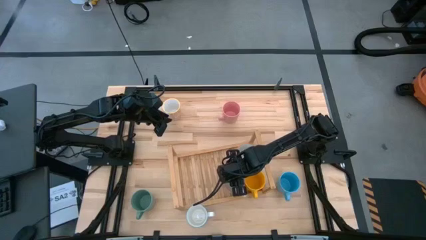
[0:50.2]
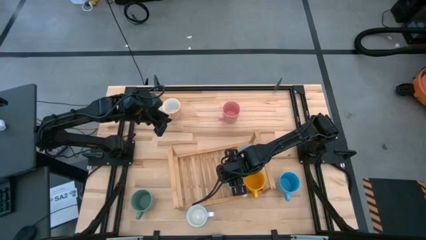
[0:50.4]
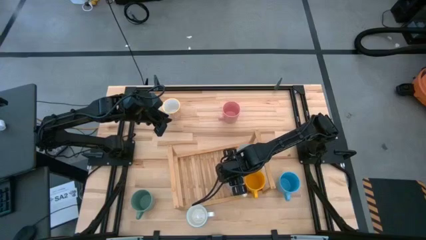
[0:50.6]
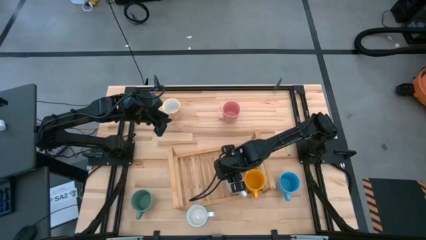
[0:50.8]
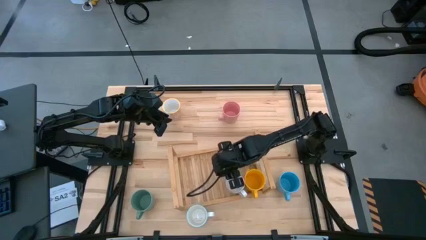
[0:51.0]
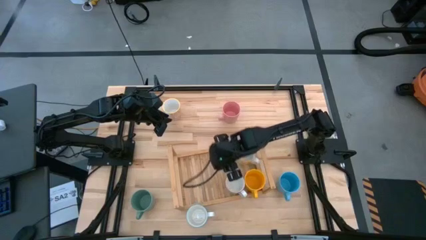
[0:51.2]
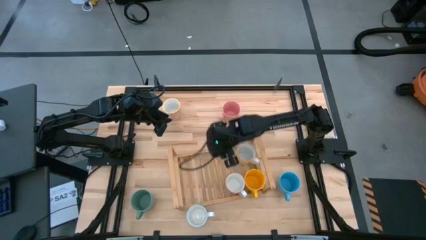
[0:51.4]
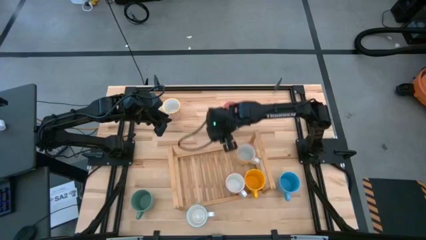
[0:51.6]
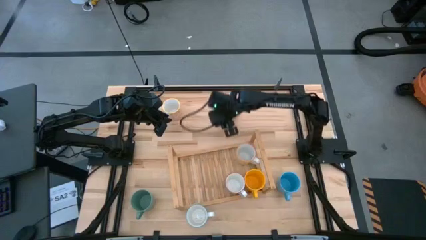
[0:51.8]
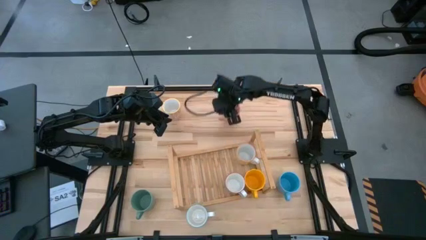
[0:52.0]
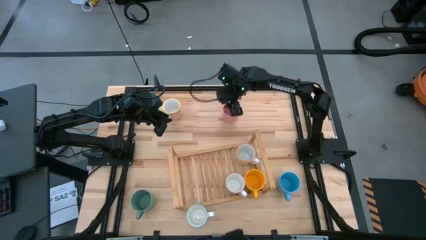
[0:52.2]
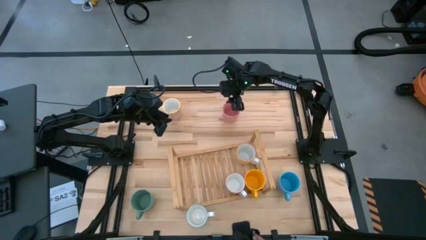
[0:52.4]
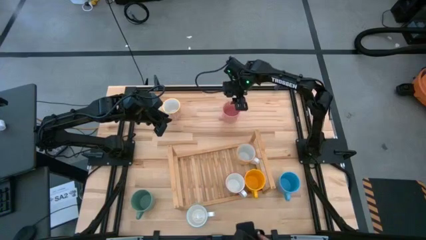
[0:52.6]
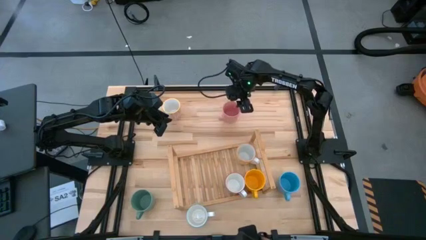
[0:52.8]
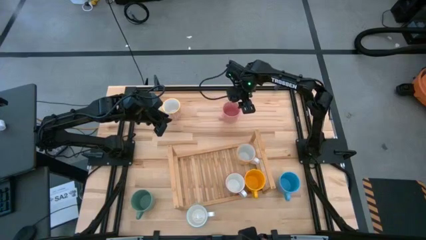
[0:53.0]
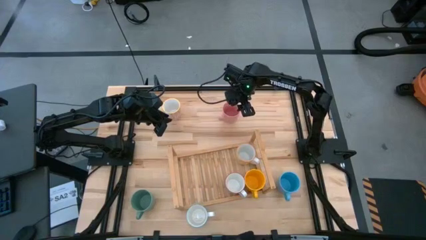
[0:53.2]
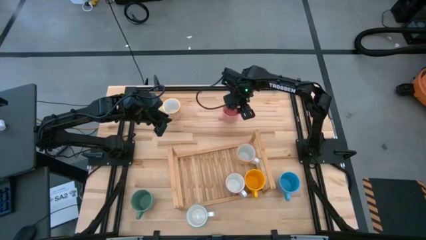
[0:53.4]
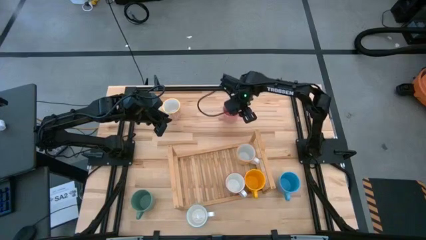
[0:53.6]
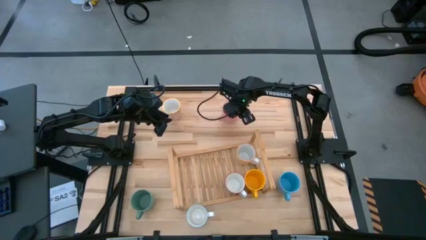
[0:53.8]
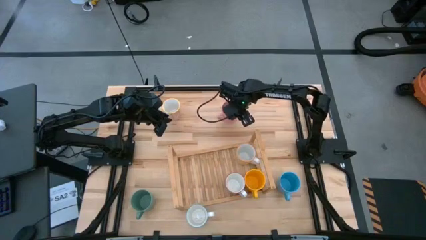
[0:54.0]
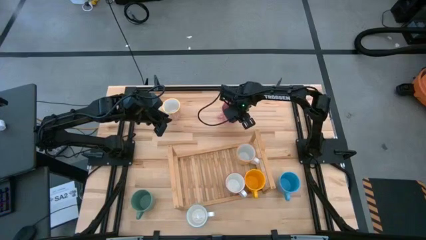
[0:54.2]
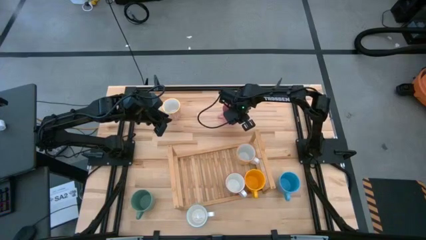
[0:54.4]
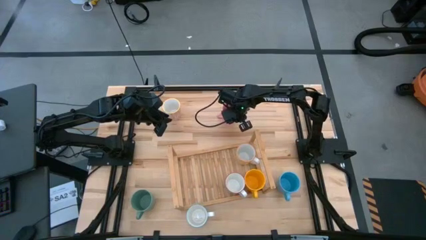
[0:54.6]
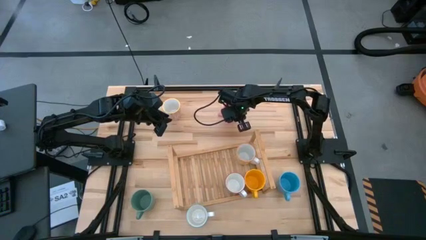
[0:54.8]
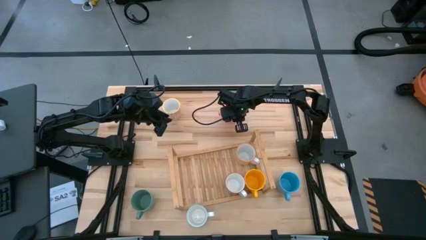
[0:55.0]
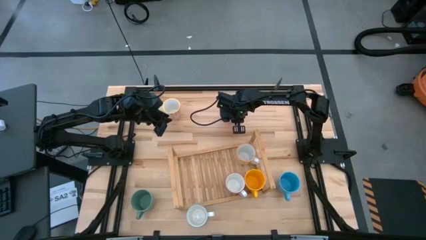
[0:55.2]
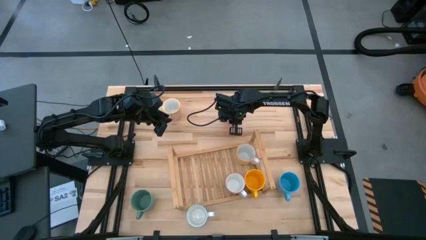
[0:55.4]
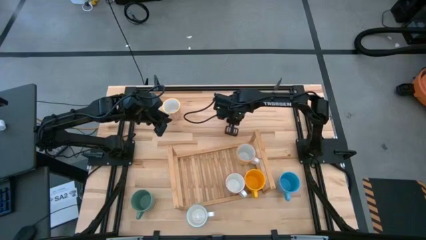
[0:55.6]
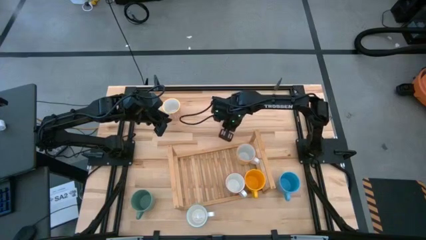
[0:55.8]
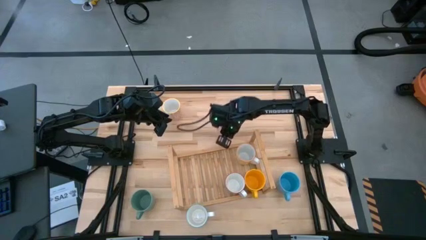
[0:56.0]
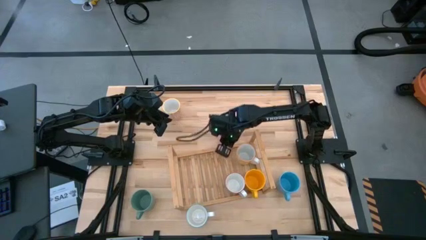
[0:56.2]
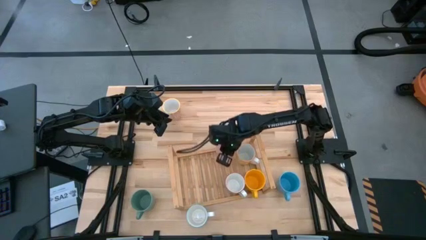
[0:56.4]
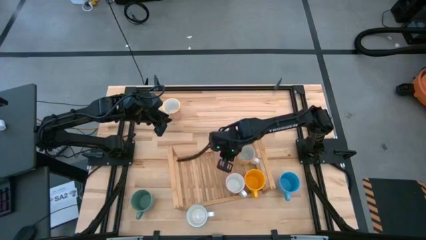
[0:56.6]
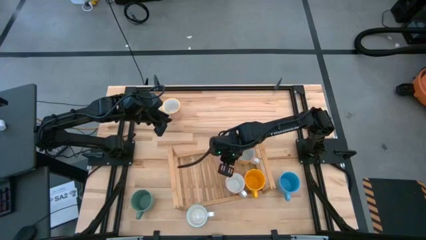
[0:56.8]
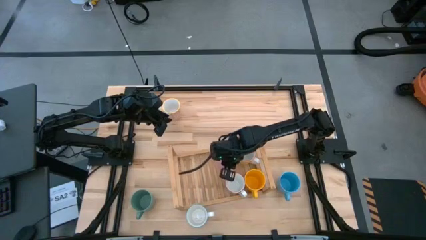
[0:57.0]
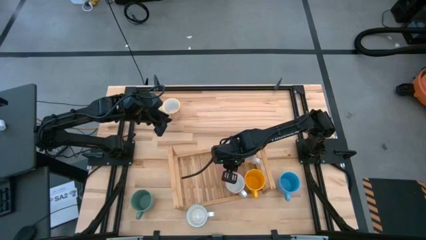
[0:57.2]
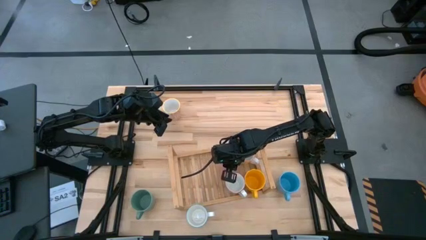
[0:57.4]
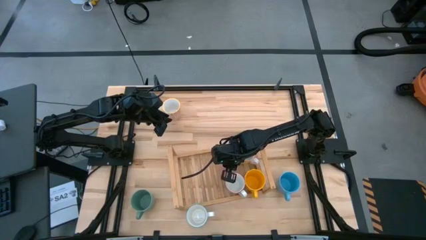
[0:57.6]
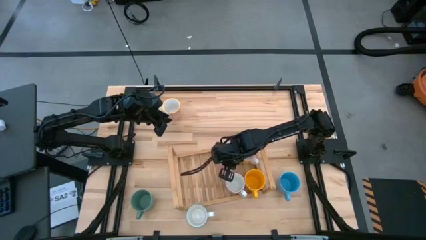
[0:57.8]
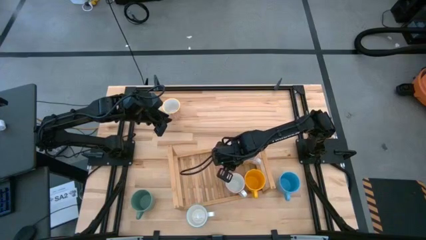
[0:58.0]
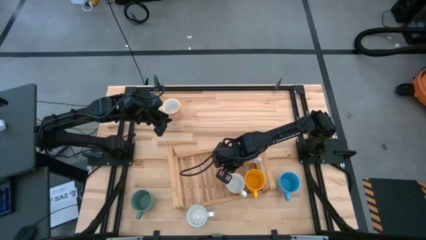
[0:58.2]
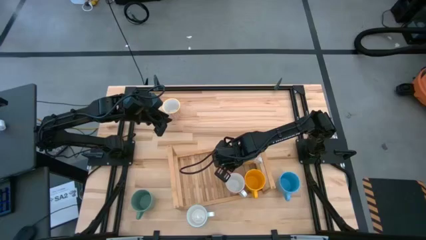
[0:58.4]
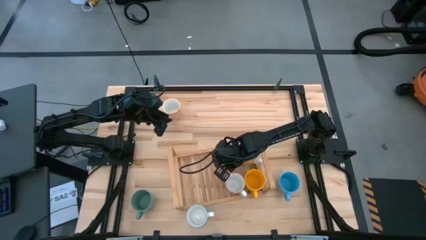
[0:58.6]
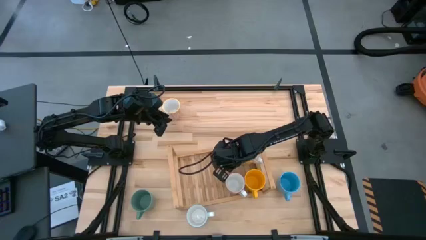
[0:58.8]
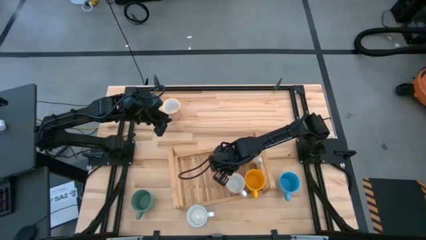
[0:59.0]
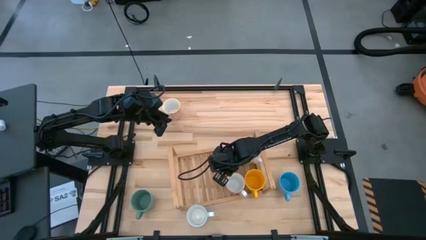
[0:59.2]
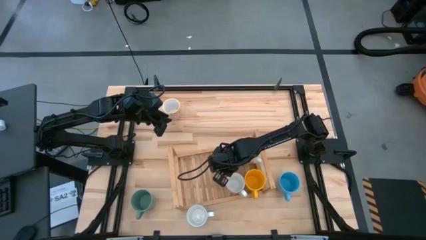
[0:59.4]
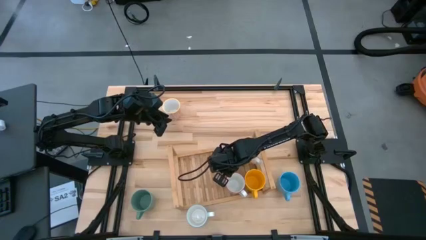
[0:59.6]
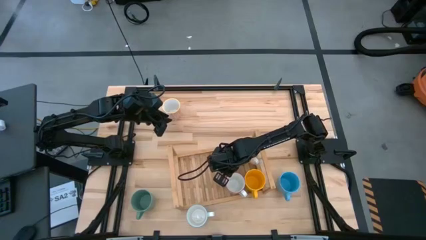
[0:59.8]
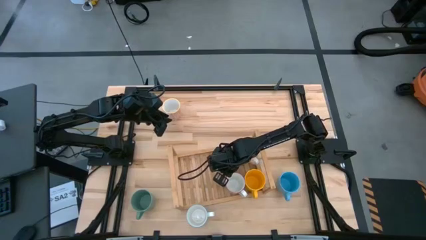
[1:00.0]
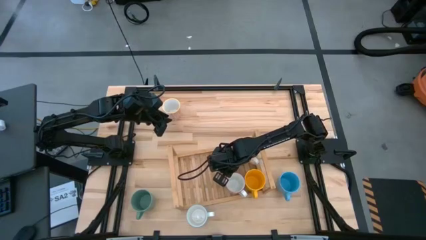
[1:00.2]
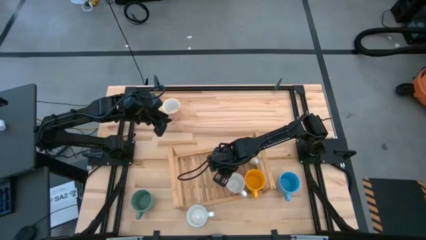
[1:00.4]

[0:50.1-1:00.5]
Task: Place coffee mugs
Put the pink mug on the shelf

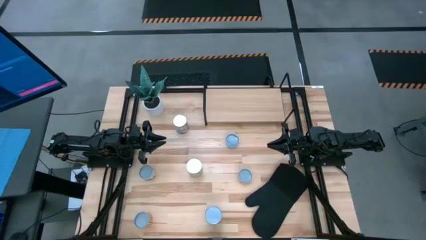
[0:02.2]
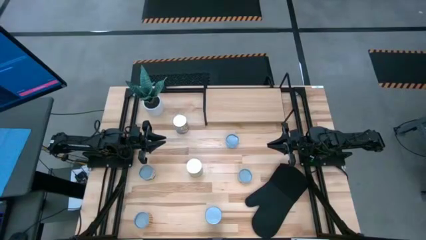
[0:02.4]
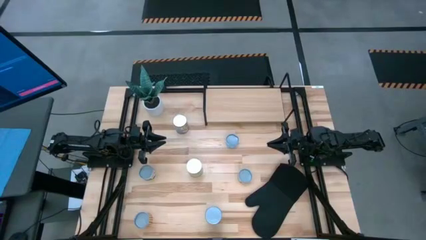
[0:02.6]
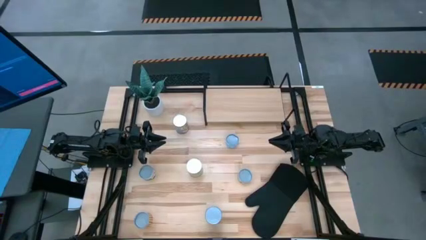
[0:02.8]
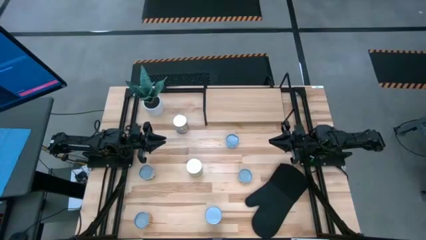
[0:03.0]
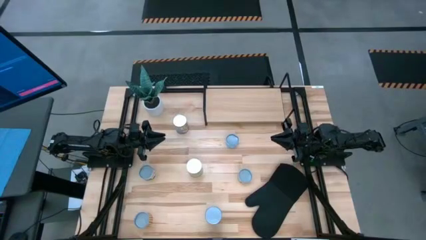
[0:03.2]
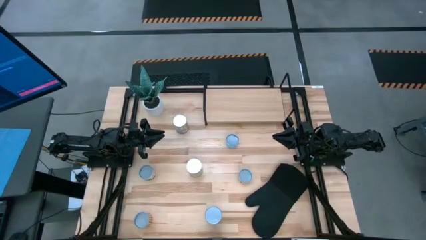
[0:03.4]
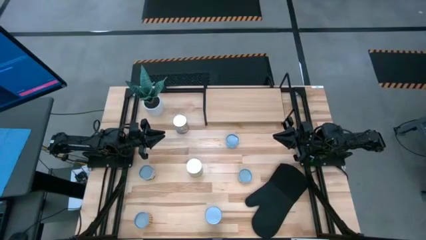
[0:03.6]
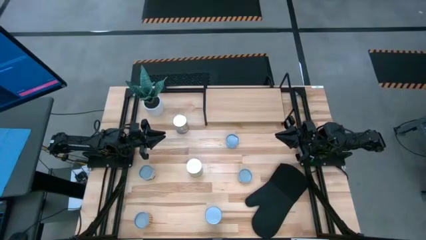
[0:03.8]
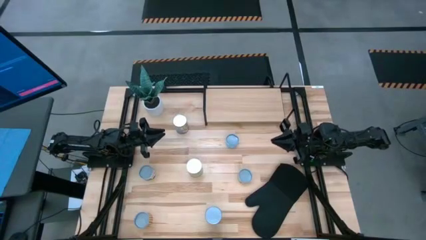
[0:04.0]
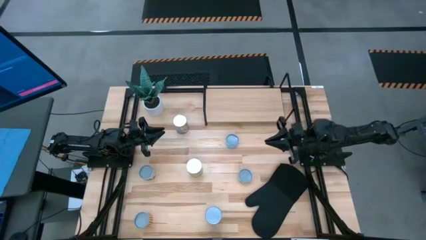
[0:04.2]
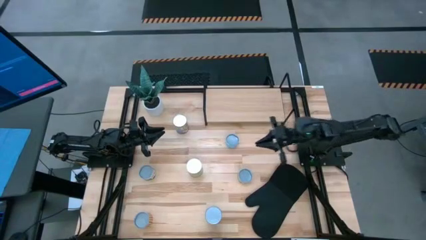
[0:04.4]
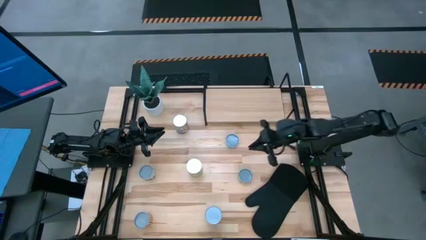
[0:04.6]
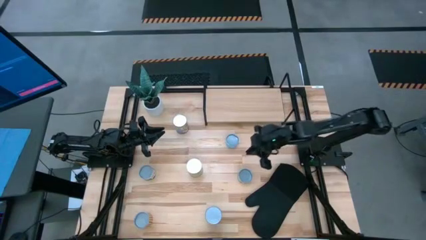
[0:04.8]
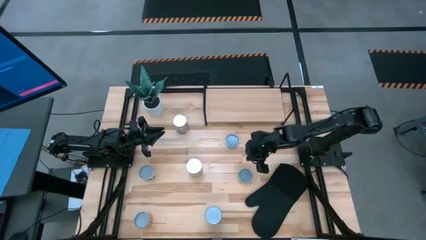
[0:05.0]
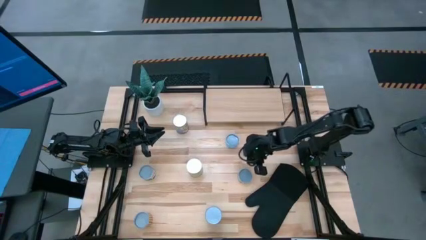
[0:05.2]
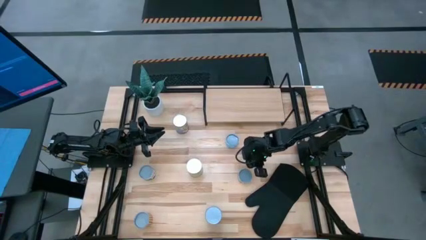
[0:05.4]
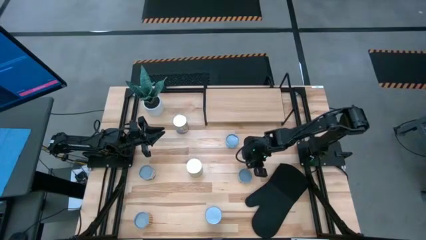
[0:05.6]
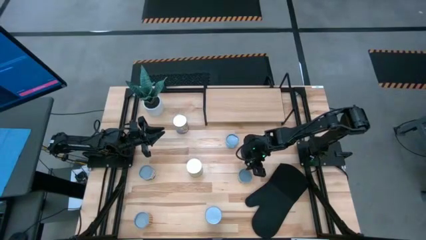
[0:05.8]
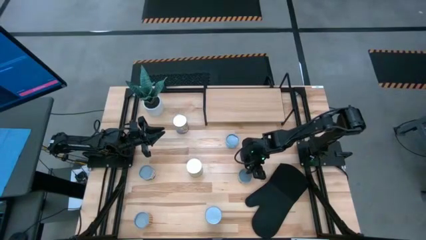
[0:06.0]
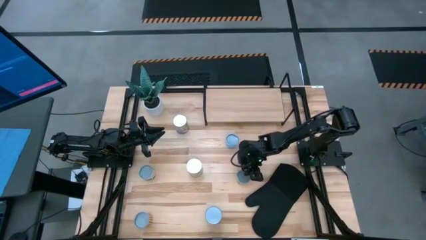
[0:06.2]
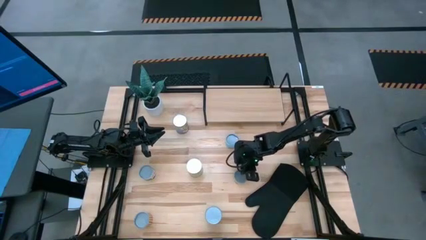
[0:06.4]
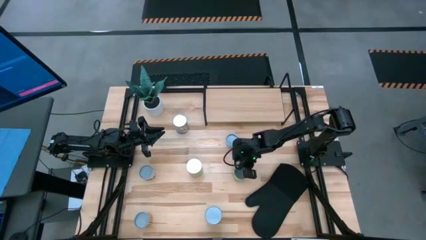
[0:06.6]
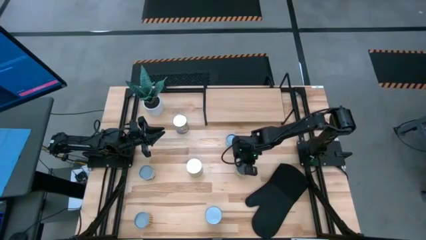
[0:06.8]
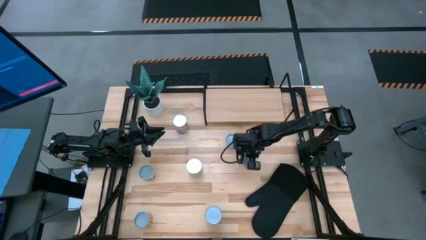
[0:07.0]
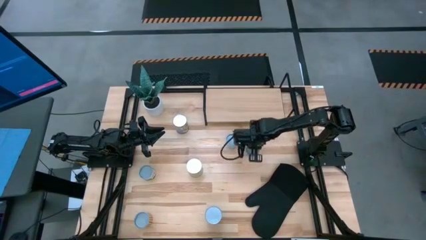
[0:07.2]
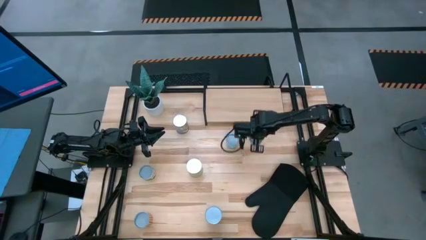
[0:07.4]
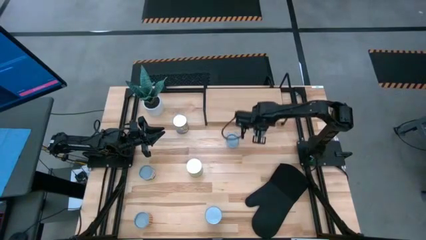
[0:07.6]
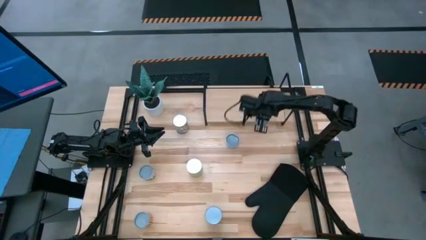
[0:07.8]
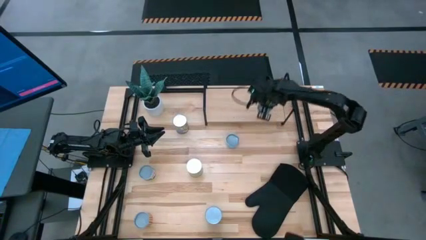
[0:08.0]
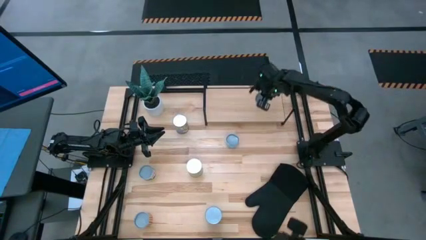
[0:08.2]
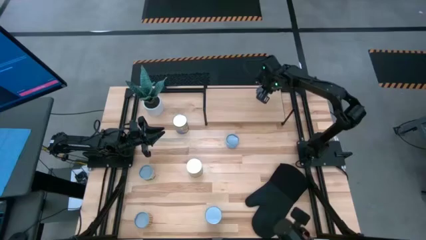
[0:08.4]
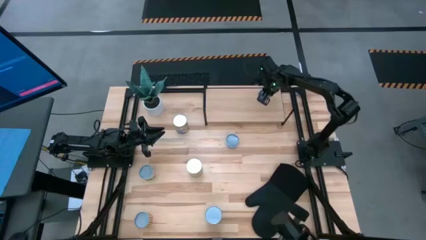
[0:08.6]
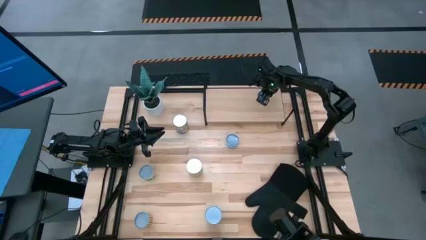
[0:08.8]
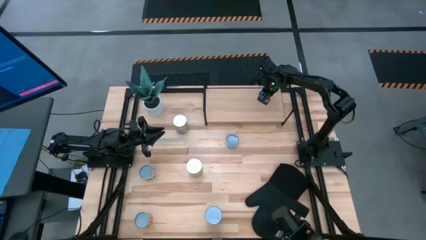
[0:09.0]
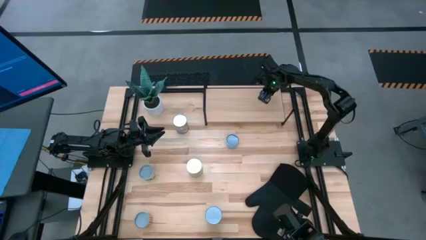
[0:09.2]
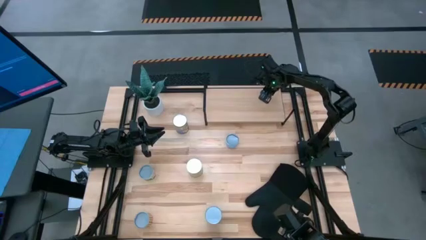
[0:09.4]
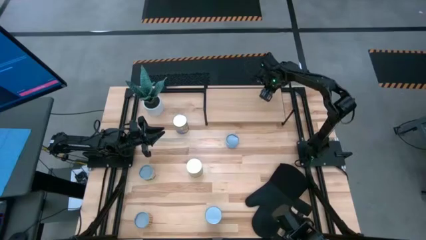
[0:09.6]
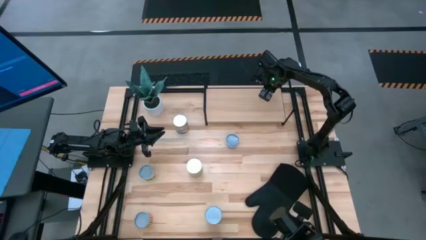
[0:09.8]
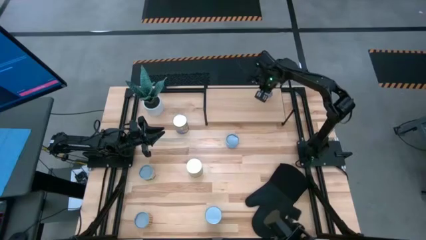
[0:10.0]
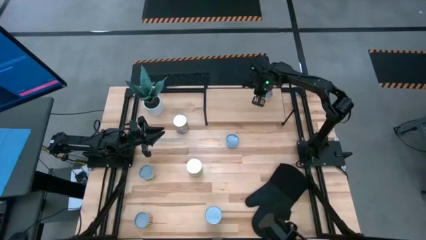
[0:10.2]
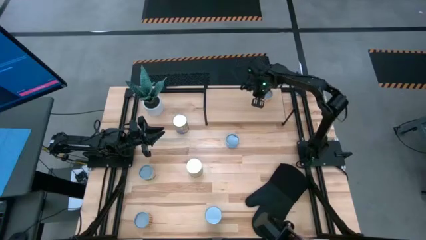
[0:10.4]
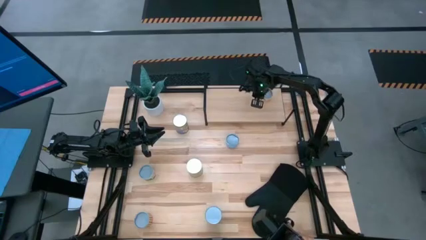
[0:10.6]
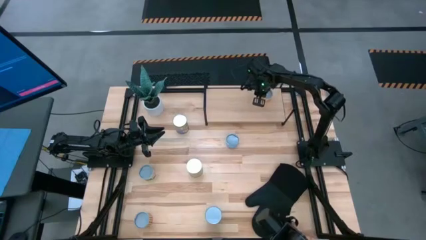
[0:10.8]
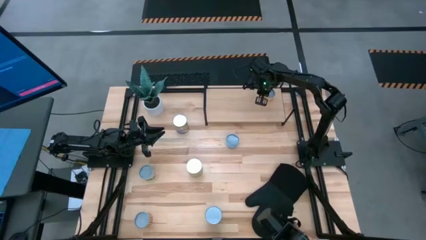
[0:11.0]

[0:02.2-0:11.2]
Task: Pick and place cans onto a shelf
Put the canned mushroom on the shelf
